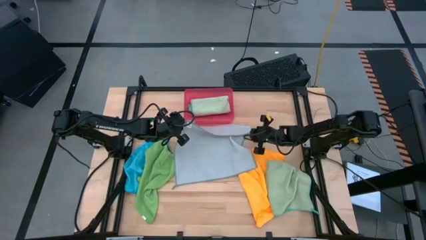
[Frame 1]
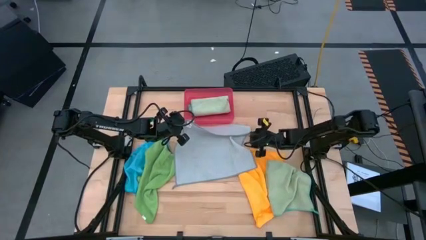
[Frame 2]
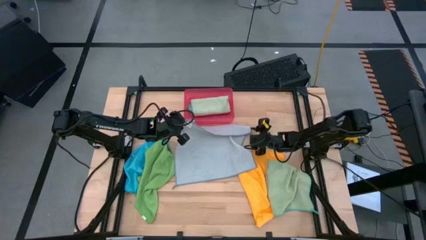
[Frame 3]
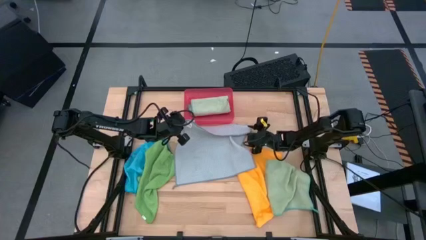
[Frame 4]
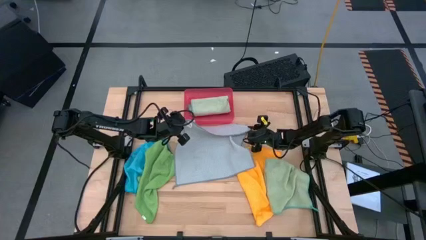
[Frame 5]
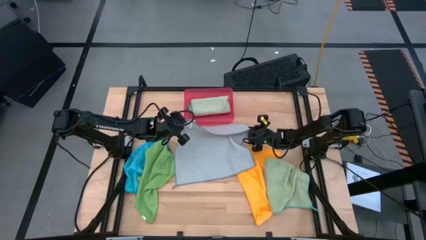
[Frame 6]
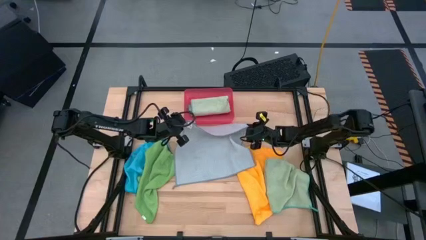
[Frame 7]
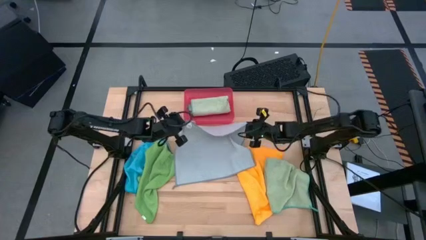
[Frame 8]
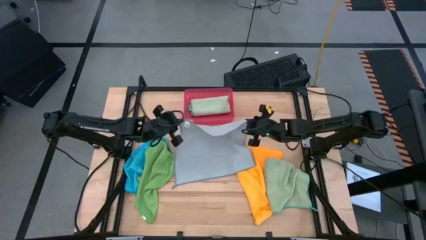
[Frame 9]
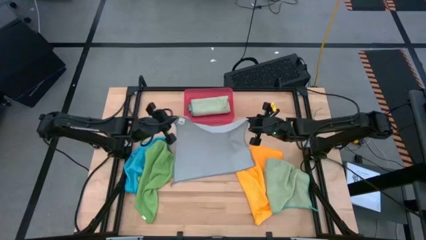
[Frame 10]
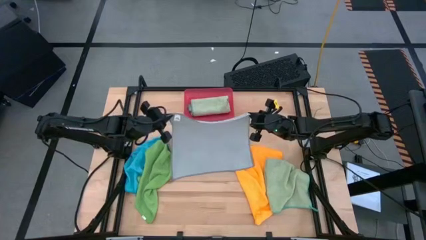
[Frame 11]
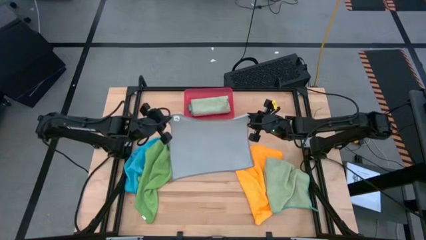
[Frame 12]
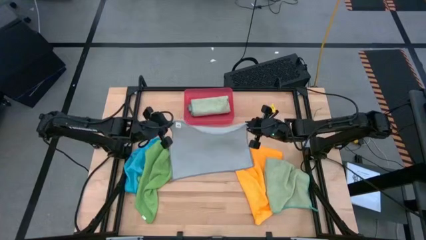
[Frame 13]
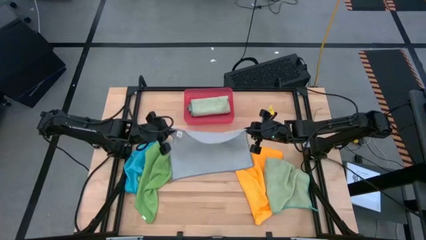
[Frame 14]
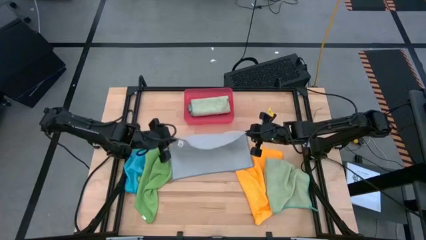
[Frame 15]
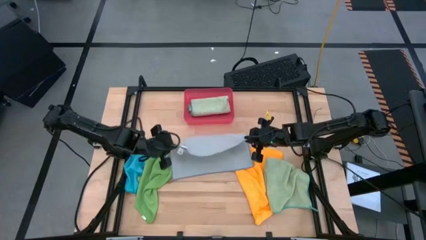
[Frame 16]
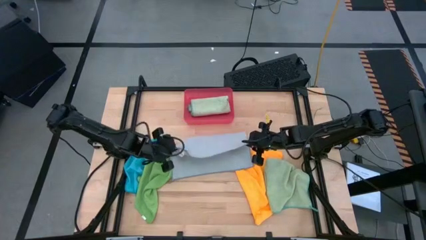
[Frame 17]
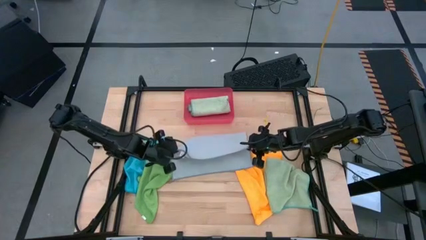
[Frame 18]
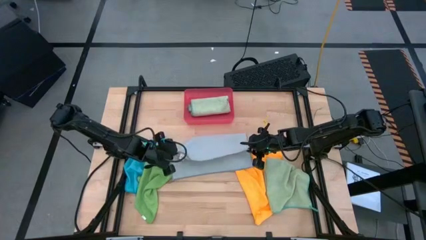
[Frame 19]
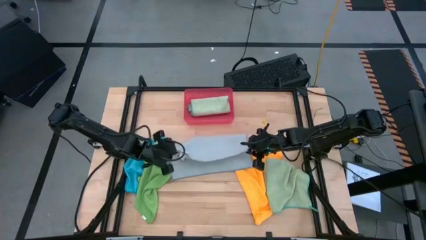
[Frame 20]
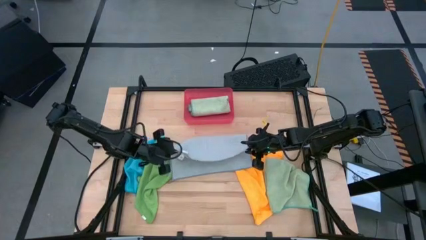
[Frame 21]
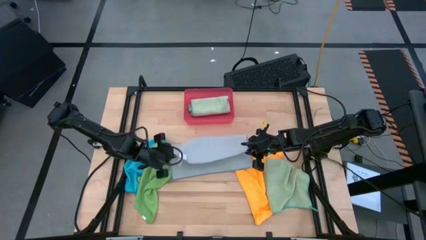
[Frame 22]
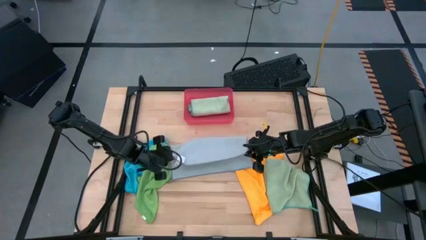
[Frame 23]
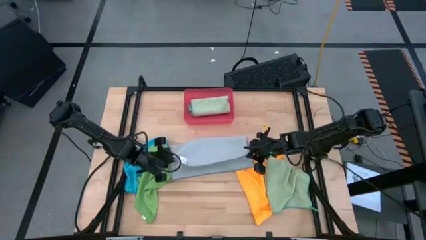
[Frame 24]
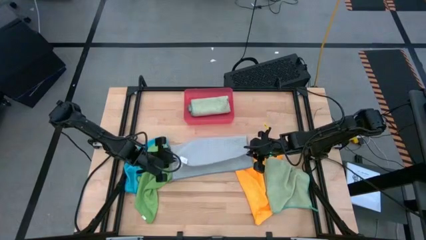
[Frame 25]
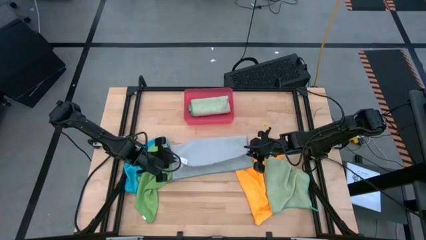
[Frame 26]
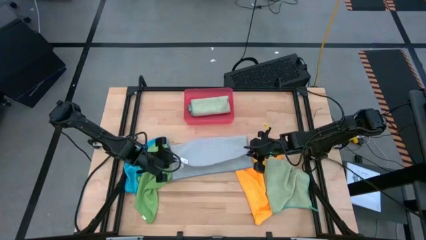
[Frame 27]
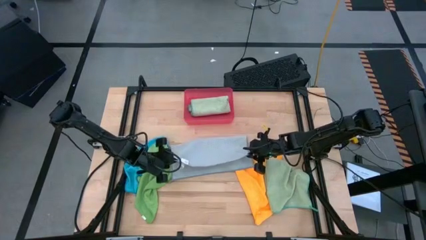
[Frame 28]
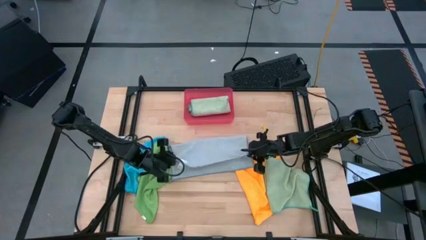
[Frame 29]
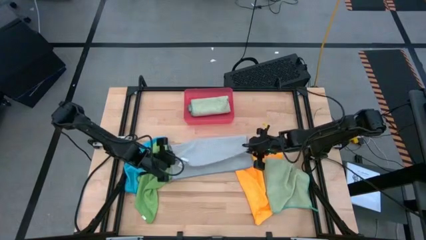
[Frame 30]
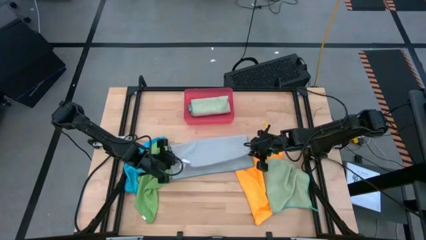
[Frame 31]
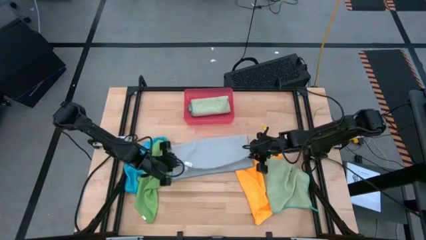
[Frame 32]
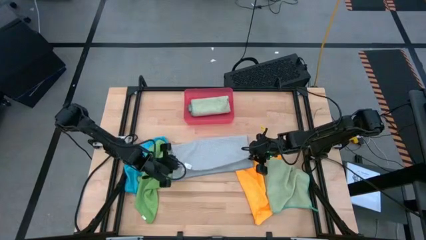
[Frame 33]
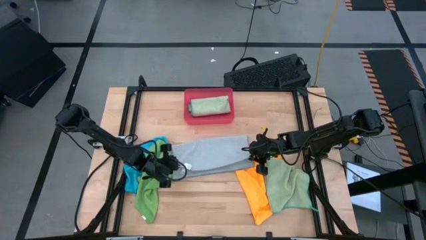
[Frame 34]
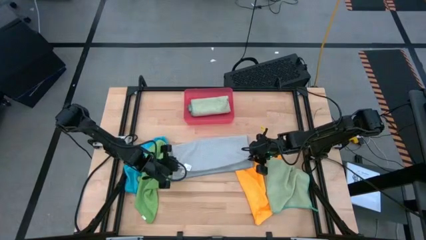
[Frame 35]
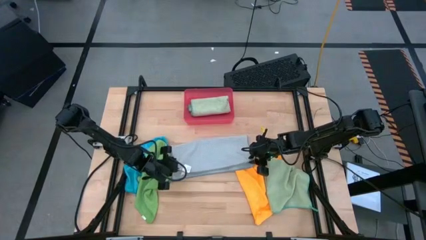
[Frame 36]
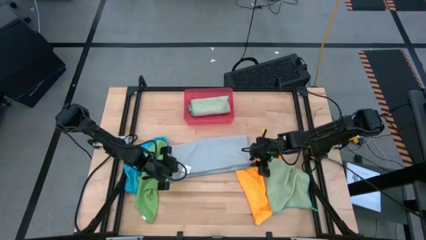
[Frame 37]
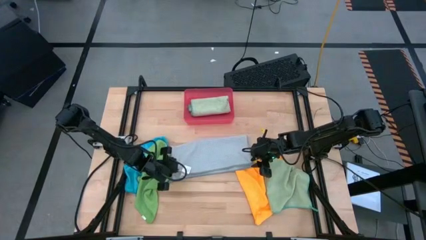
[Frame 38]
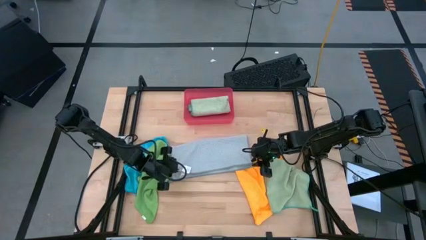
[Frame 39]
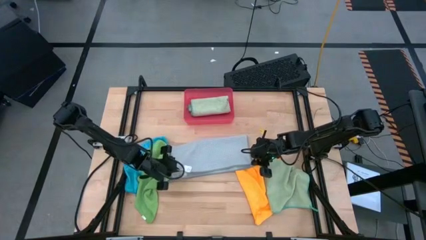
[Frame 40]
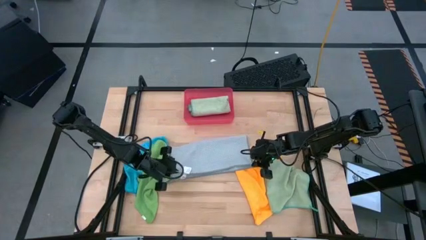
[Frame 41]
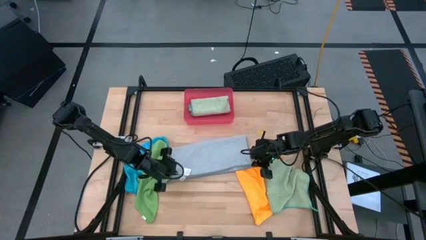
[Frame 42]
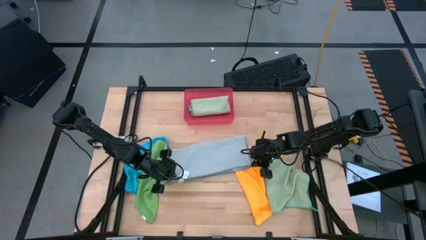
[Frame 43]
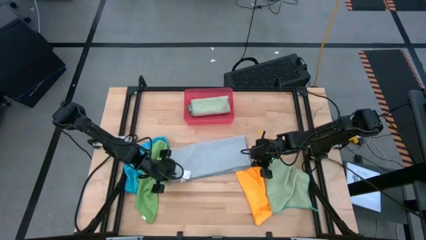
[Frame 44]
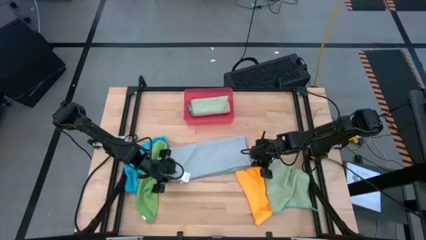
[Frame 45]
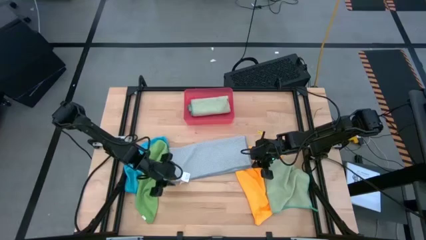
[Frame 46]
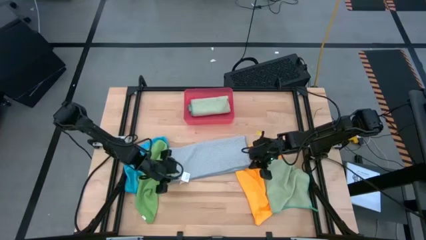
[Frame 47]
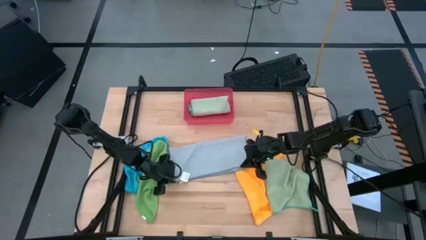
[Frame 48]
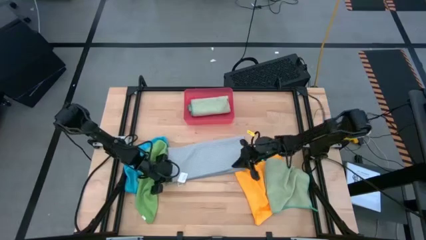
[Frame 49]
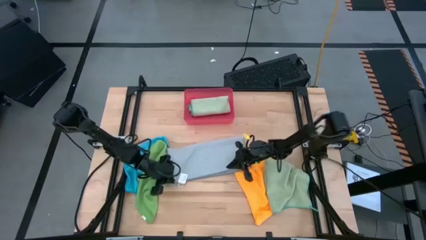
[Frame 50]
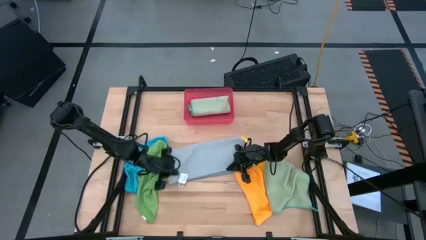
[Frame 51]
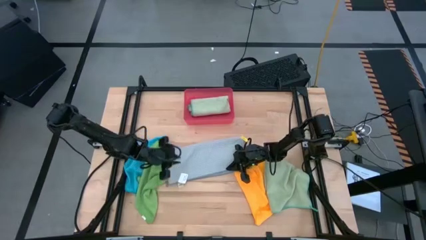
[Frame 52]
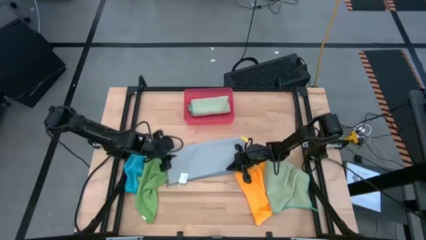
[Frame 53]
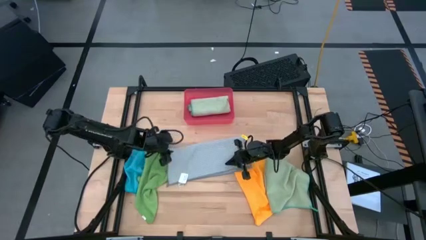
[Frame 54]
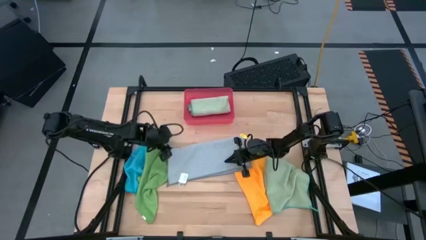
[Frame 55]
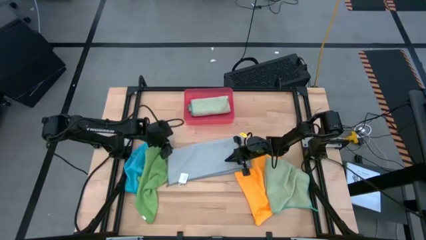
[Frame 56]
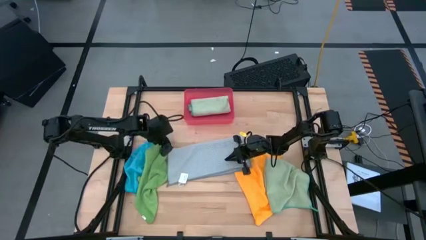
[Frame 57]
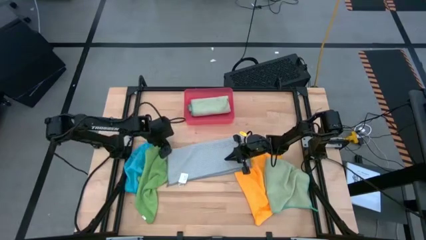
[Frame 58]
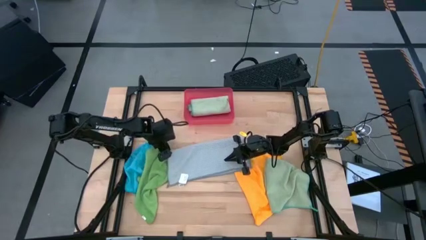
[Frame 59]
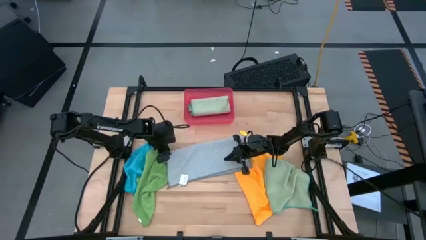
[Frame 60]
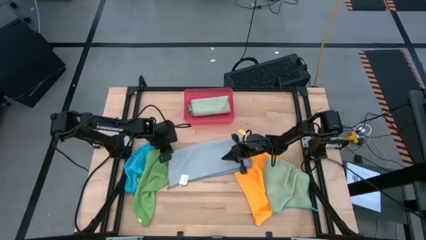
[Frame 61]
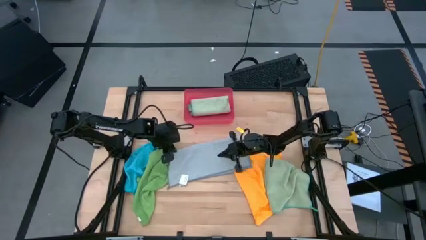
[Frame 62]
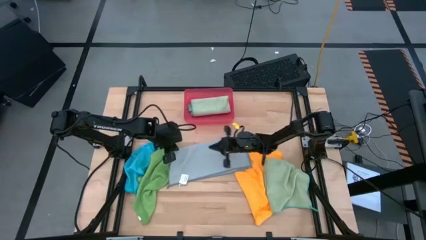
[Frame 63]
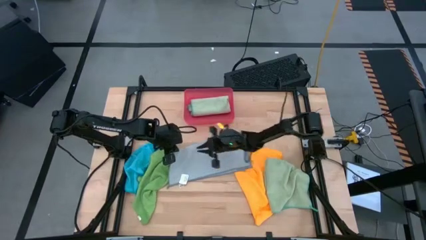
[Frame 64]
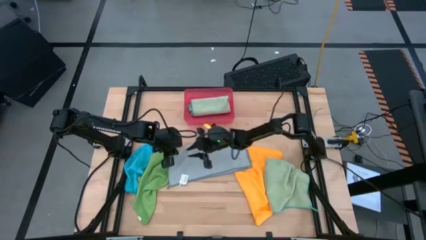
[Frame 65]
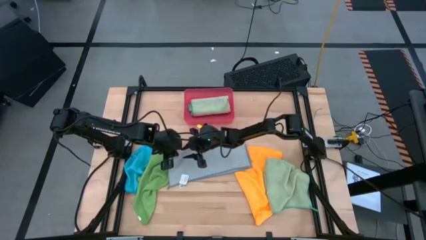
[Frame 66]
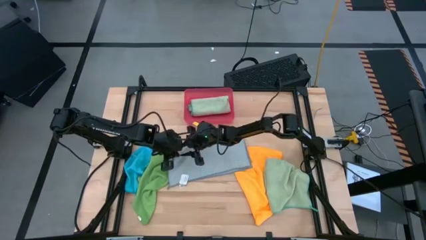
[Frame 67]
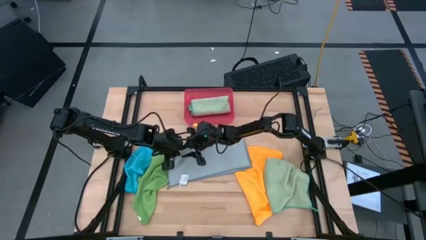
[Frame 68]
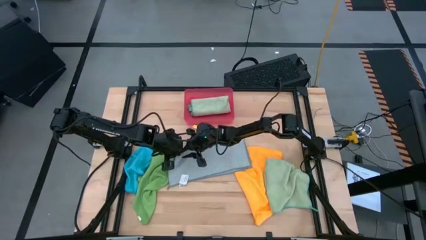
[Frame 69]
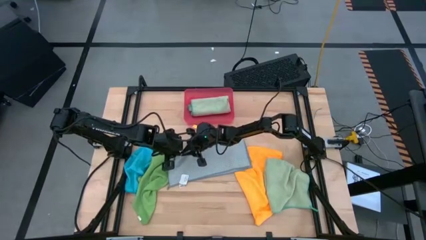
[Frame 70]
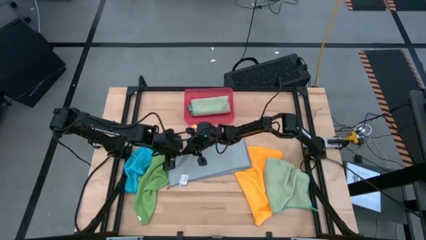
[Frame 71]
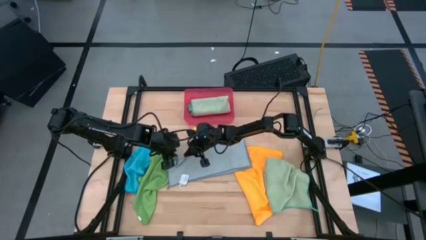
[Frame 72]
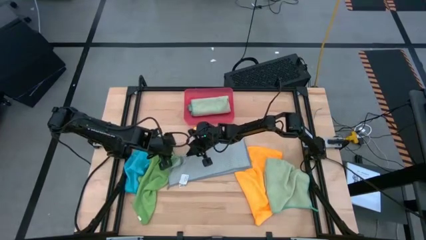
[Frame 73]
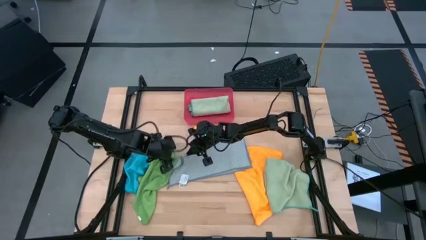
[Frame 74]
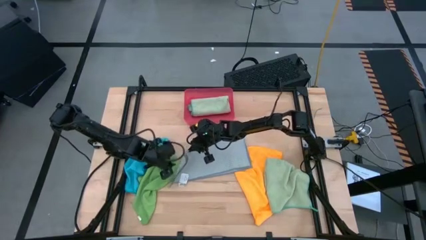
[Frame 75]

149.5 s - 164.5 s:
Task: Fold microfiber towels
Fold the gray towel
